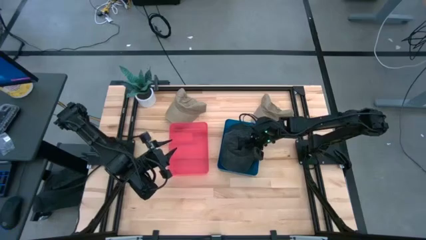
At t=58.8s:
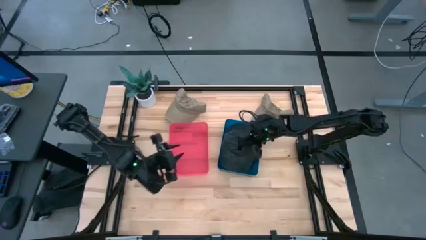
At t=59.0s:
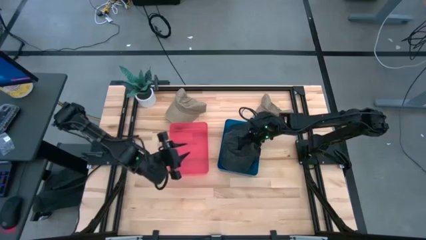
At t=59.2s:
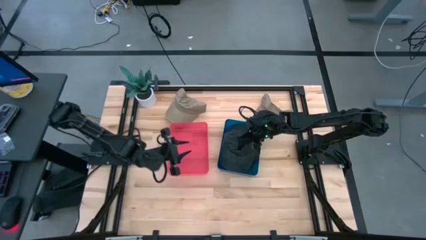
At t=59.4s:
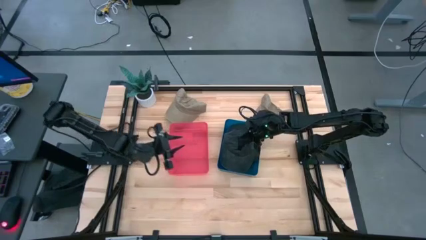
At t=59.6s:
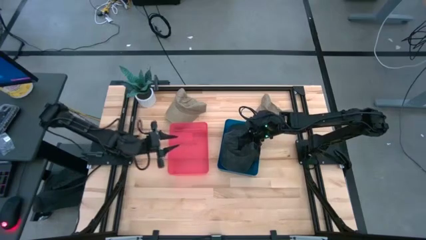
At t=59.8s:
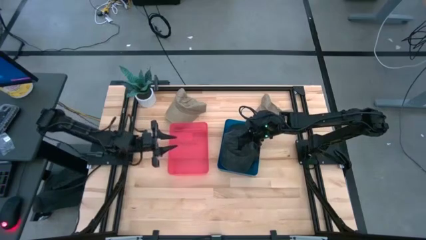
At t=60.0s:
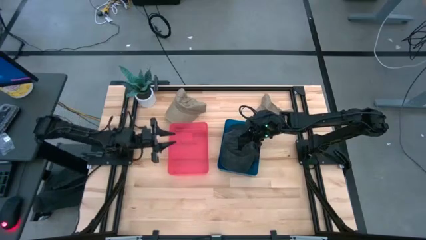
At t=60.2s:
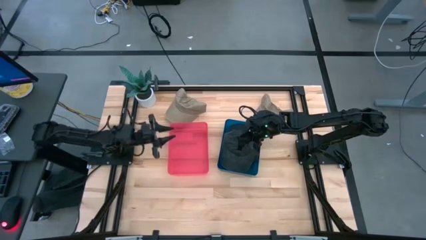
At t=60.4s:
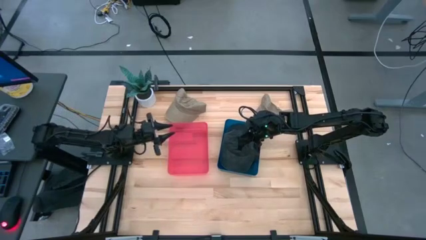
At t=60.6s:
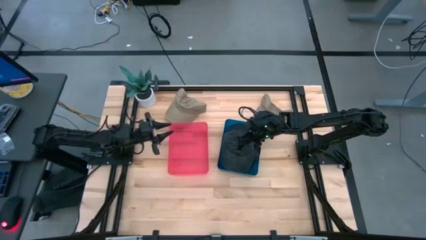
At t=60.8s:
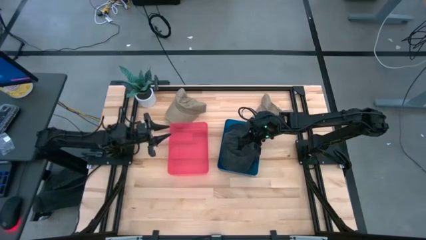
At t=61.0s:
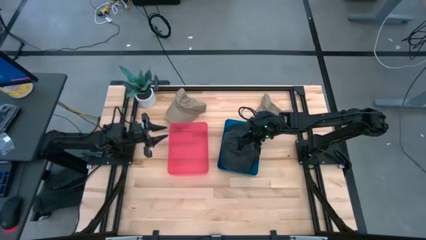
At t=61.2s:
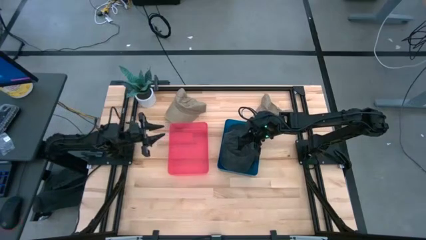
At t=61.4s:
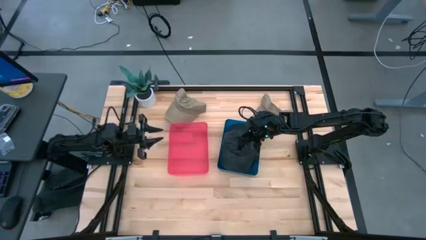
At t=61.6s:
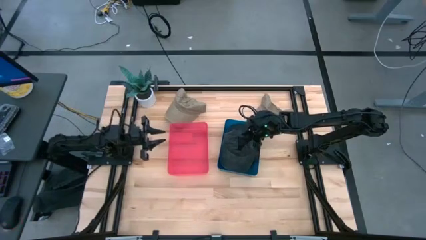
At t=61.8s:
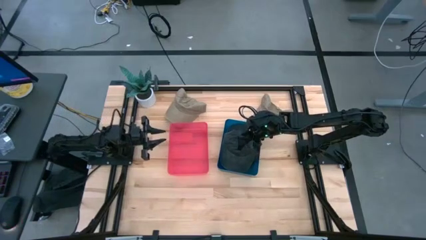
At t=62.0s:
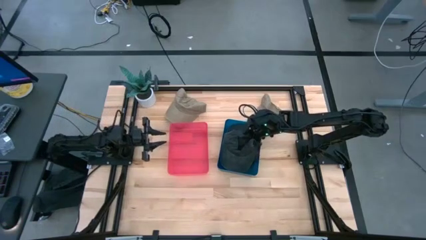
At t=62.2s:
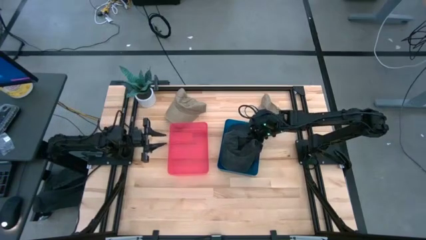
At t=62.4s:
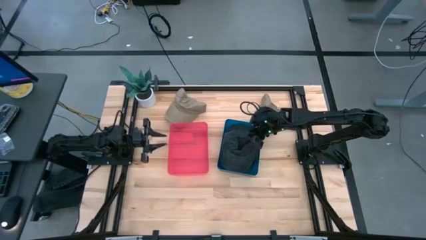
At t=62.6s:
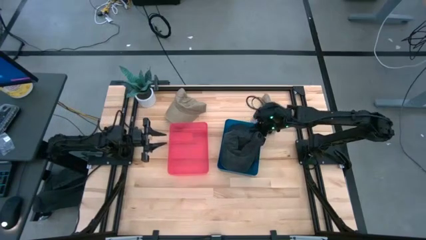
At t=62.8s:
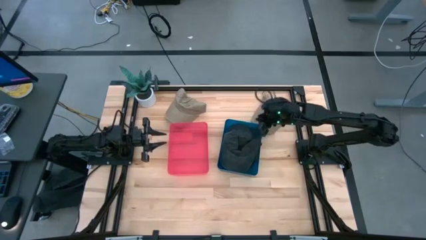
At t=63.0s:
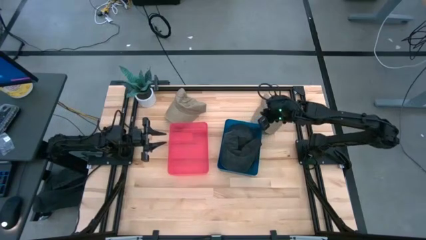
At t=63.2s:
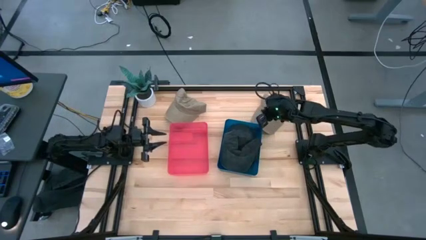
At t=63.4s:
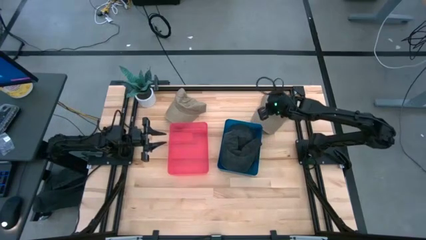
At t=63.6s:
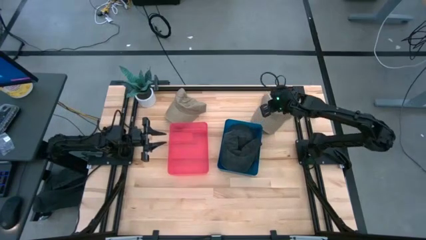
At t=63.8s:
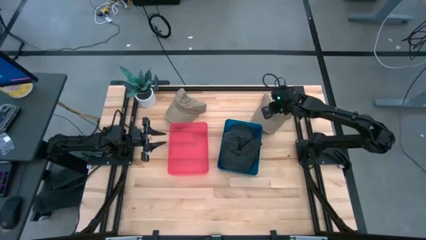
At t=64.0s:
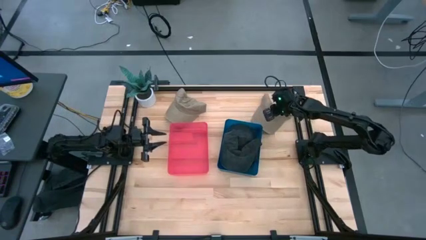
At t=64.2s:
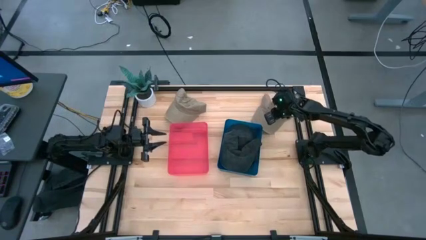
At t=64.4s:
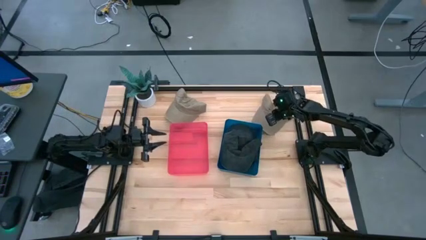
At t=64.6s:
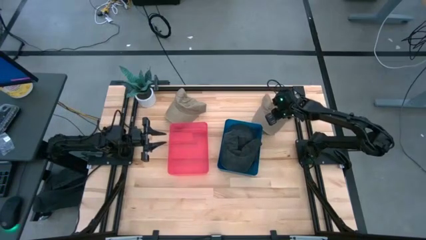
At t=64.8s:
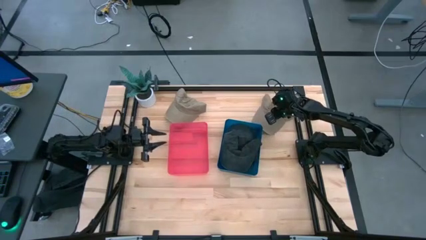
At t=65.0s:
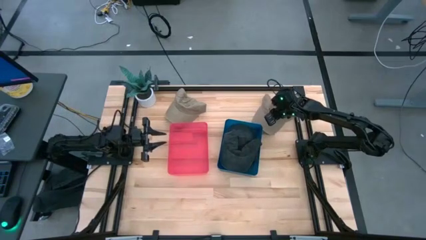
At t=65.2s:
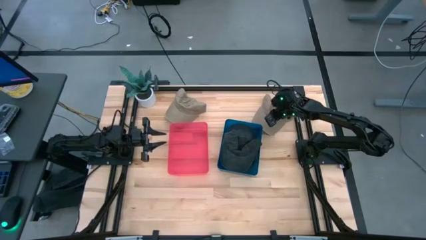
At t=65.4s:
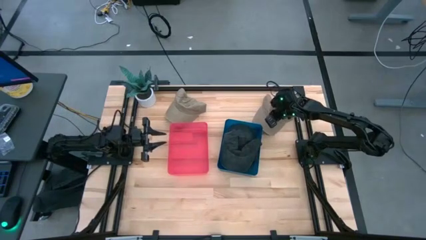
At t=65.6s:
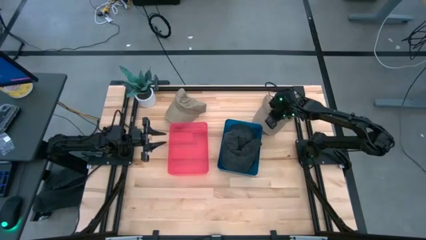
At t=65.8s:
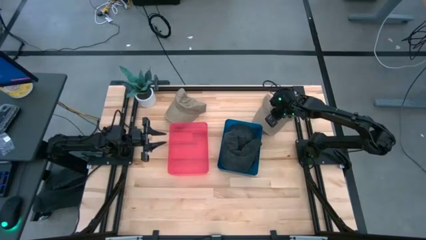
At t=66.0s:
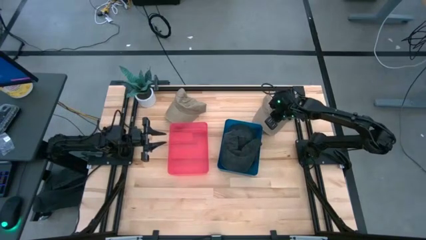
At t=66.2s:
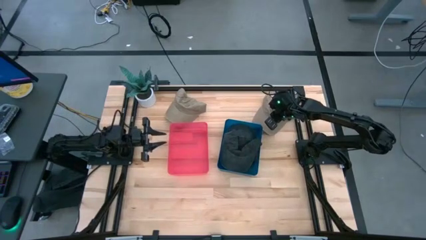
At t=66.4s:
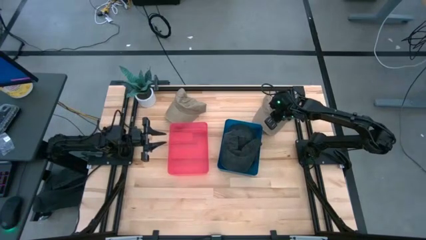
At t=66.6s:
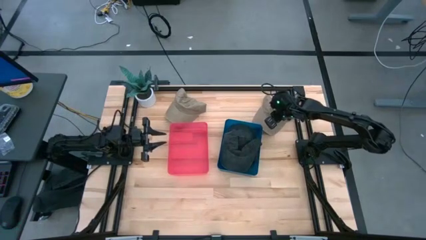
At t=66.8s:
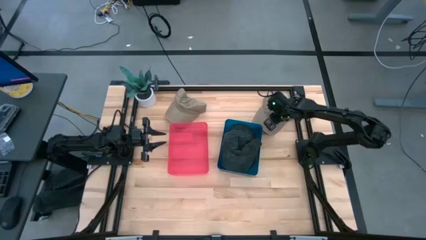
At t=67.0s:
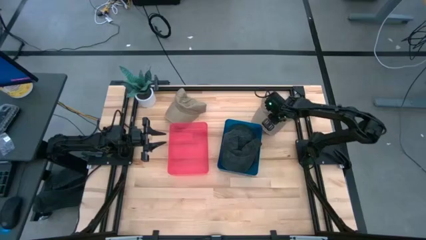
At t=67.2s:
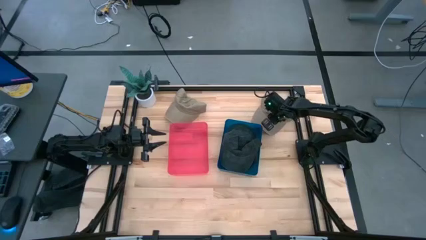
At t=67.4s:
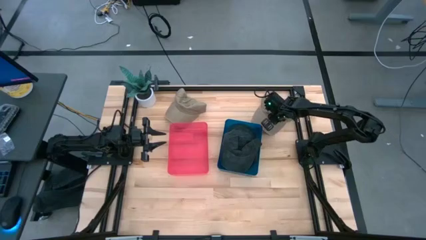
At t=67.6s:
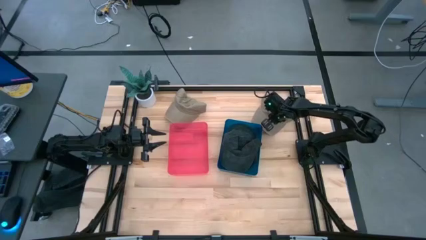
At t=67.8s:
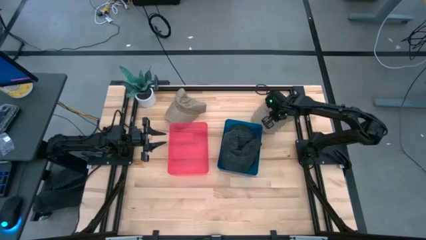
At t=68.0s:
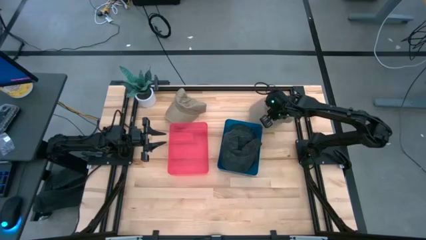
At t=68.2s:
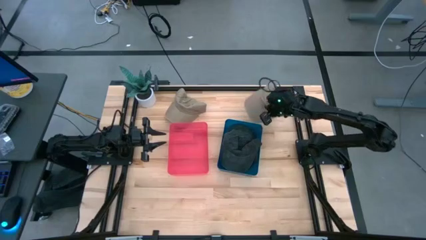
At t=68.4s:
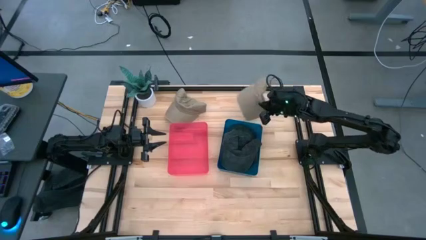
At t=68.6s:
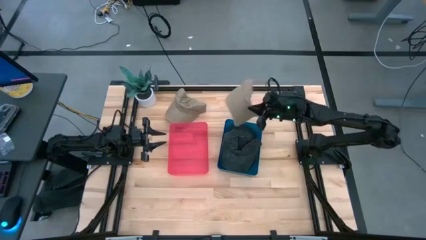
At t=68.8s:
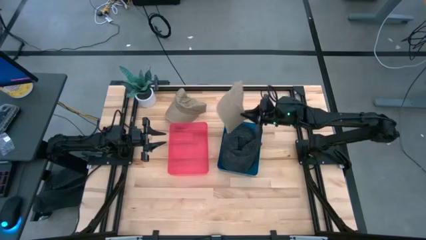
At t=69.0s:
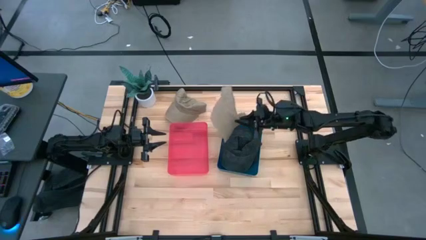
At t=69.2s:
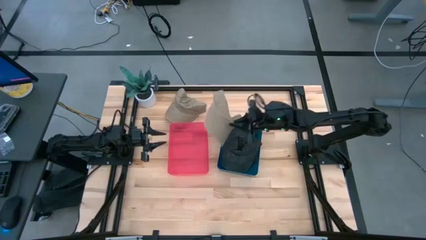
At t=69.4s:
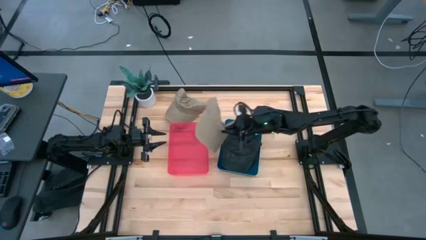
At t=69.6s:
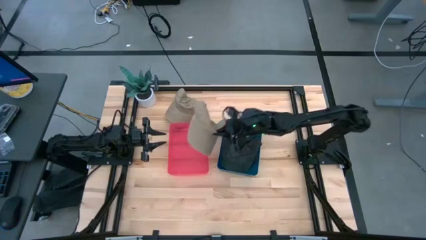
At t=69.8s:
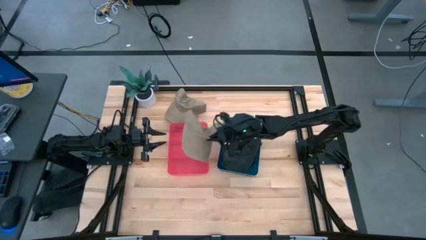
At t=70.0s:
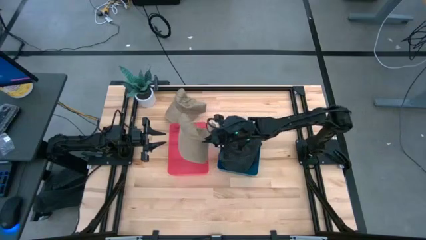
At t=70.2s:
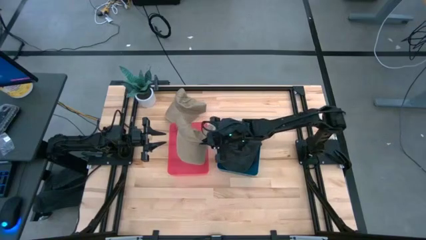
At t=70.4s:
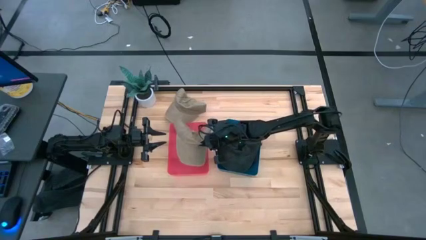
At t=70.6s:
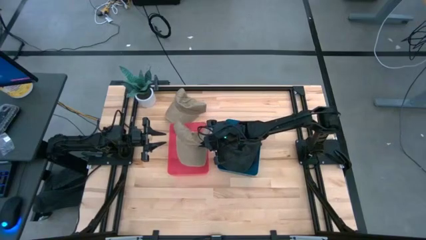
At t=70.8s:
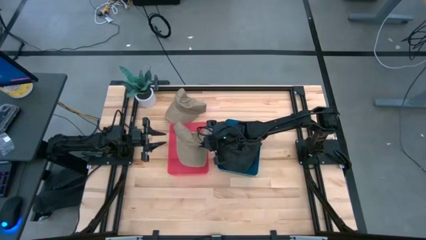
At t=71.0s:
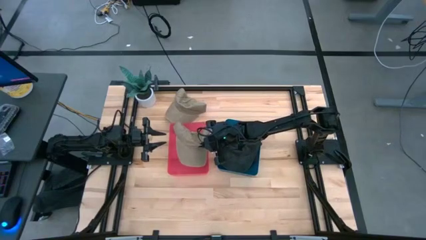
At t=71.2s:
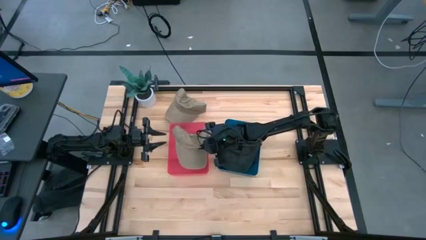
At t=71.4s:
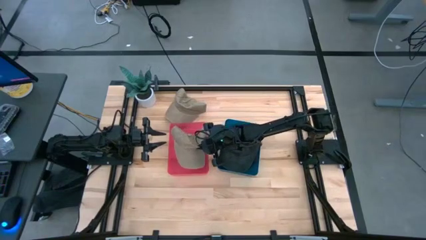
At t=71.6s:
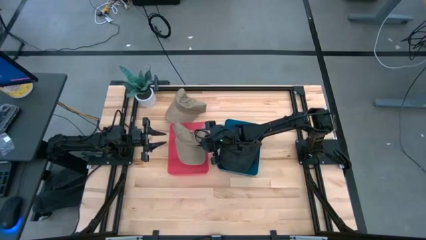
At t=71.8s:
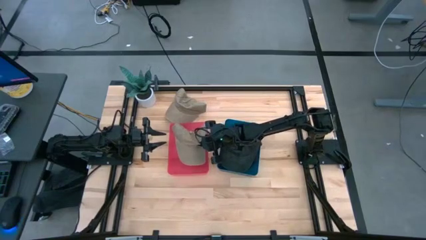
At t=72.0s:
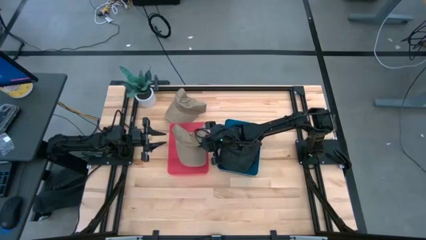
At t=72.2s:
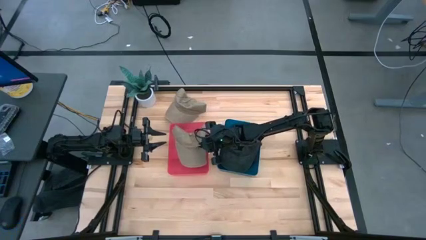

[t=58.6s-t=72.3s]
Task: Pick & Place hat
Put the brown cap into the red bin
